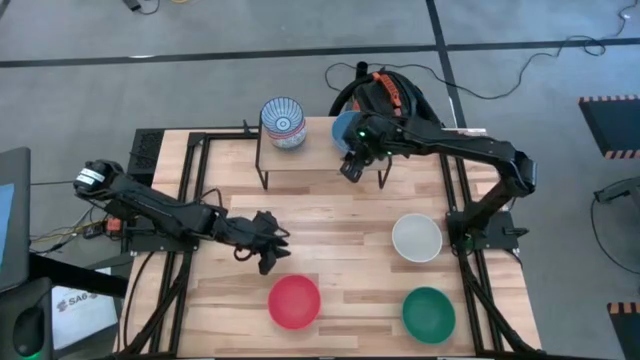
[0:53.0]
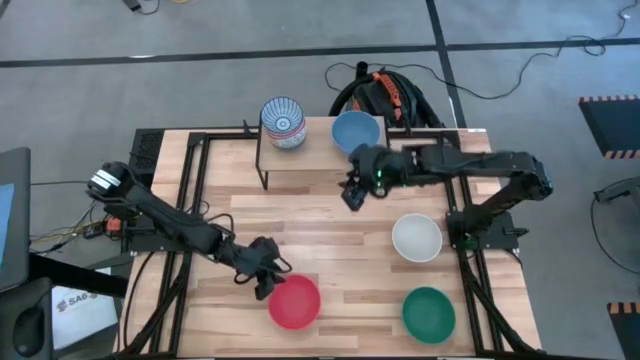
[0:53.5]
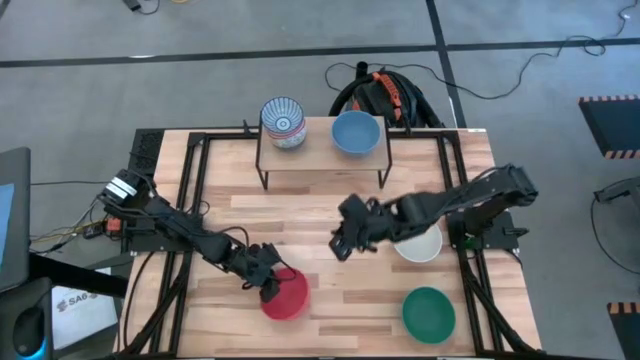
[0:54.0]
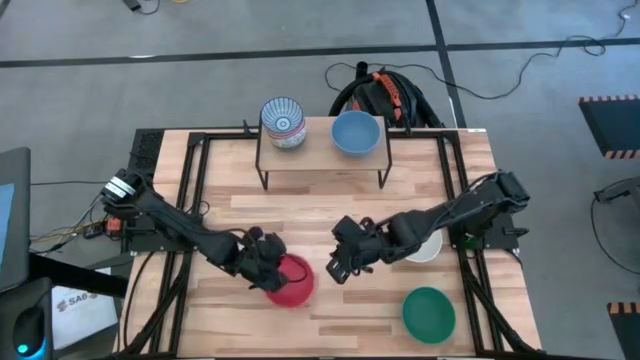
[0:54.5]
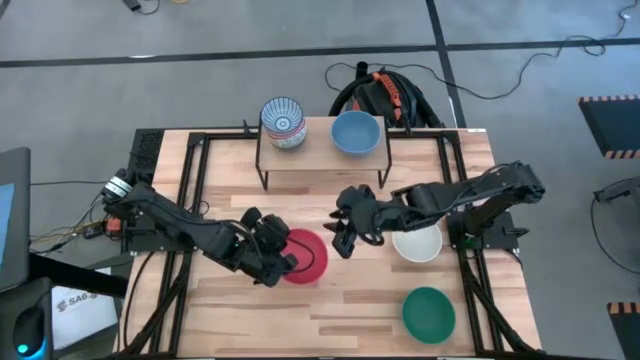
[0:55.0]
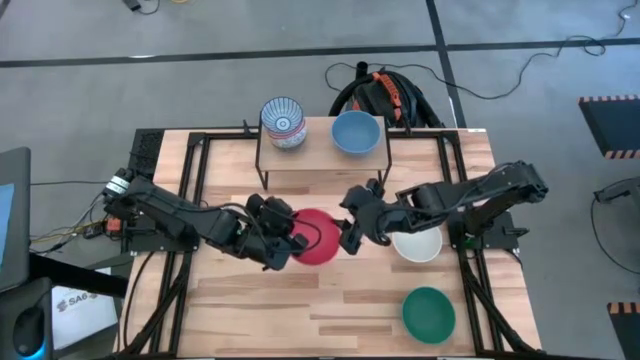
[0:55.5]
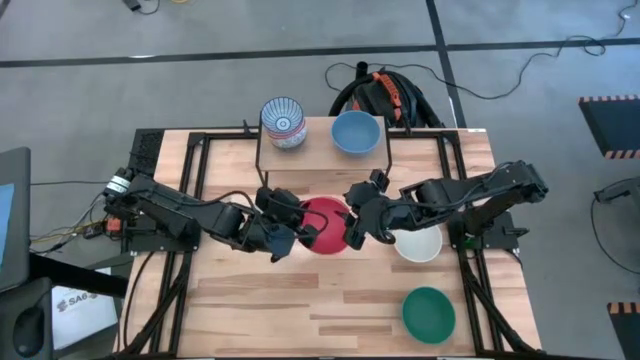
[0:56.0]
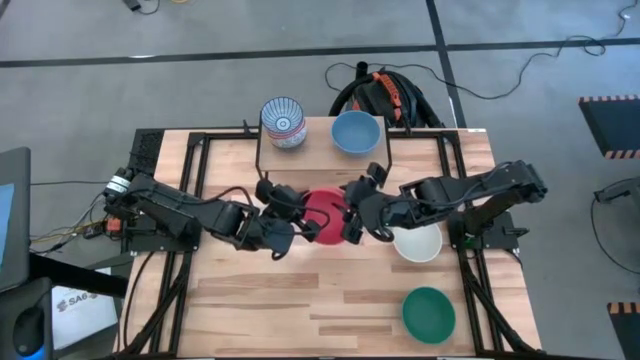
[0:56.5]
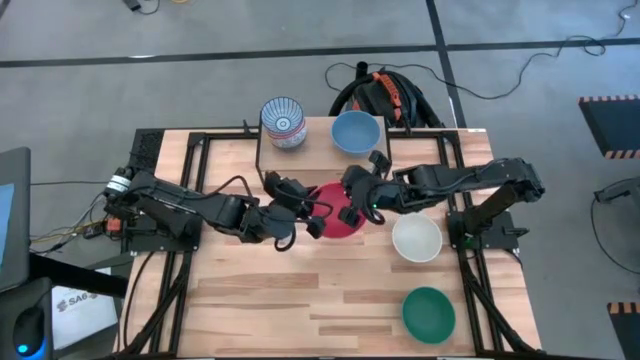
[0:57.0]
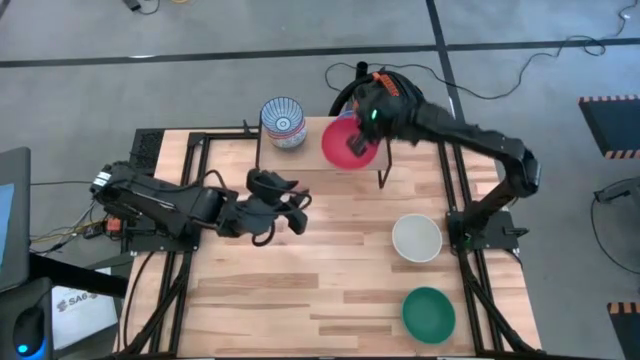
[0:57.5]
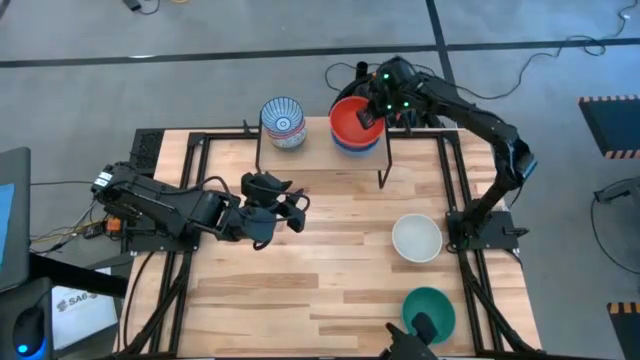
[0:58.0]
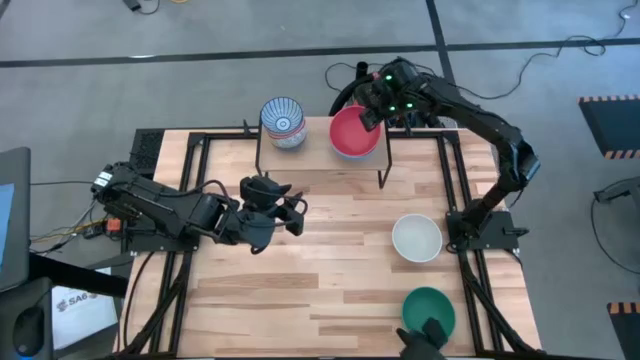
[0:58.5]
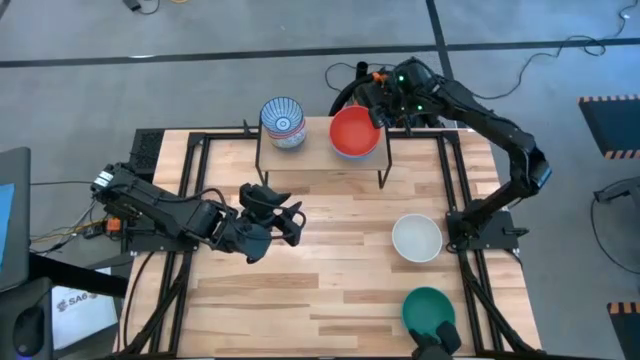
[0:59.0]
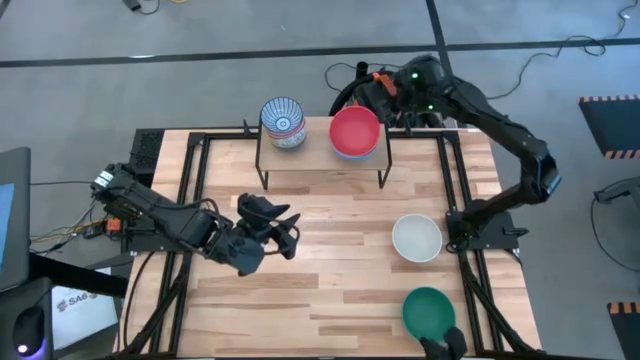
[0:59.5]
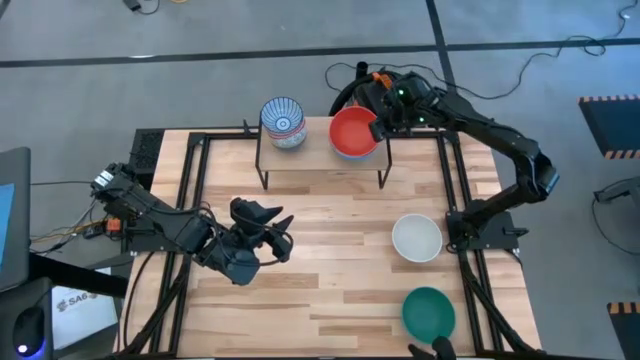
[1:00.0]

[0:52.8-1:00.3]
Task: Place and stack bowls onto a shelf
Stack the red bowl on top of the blue bowl on the shelf

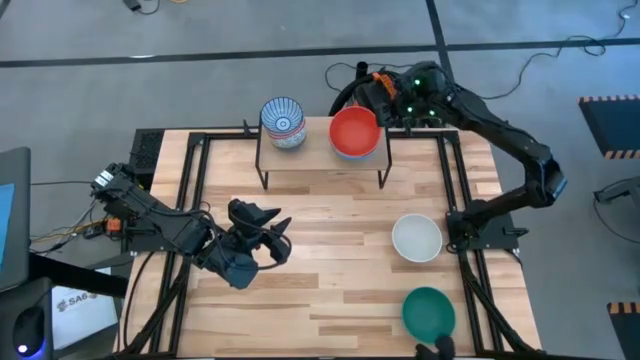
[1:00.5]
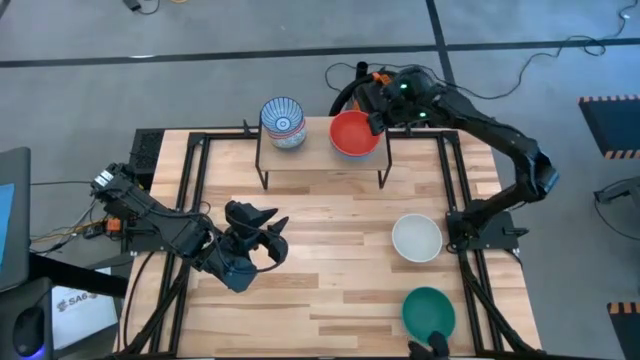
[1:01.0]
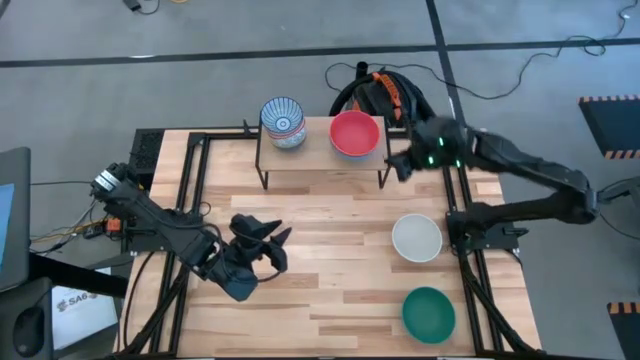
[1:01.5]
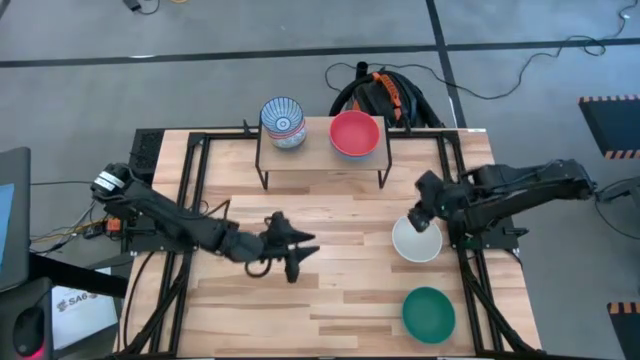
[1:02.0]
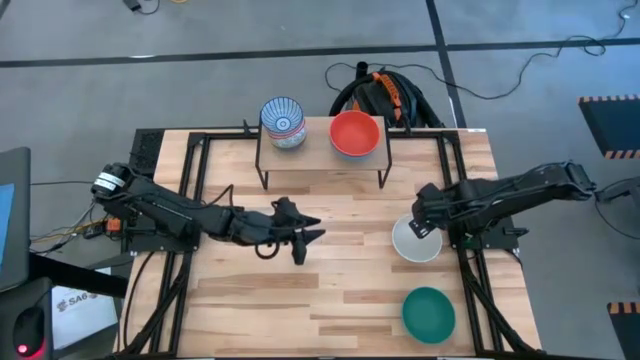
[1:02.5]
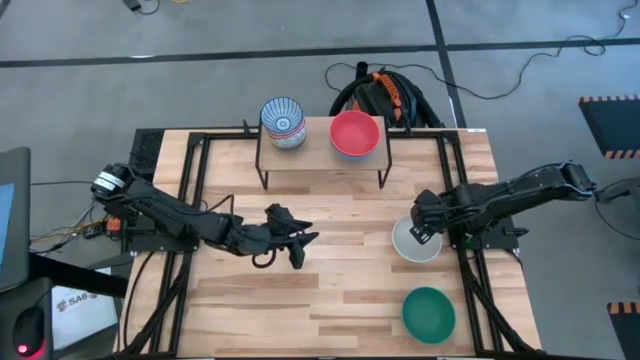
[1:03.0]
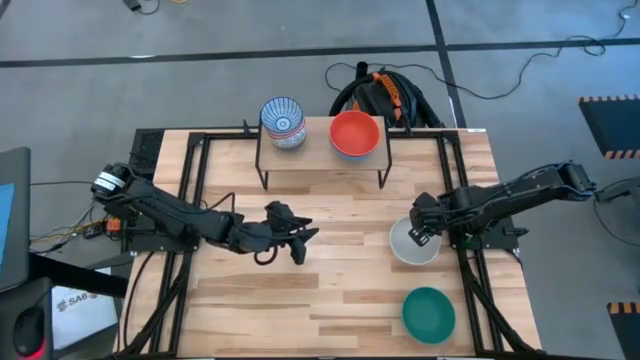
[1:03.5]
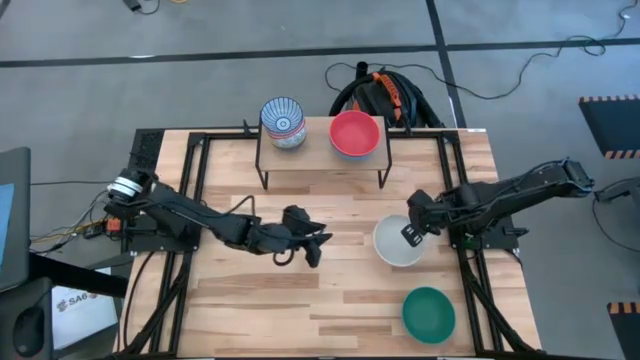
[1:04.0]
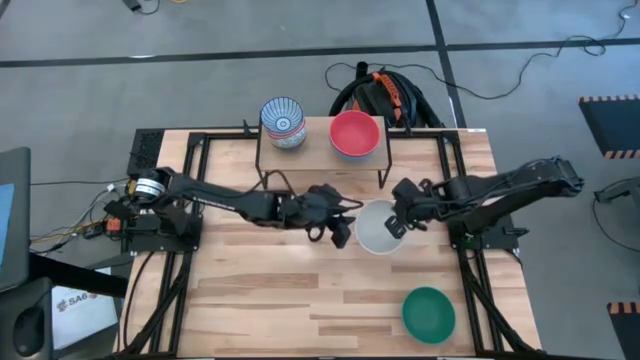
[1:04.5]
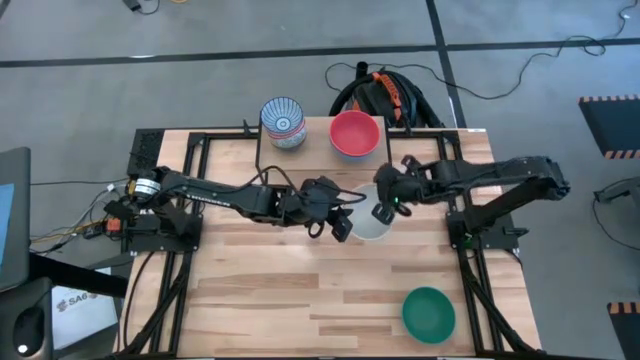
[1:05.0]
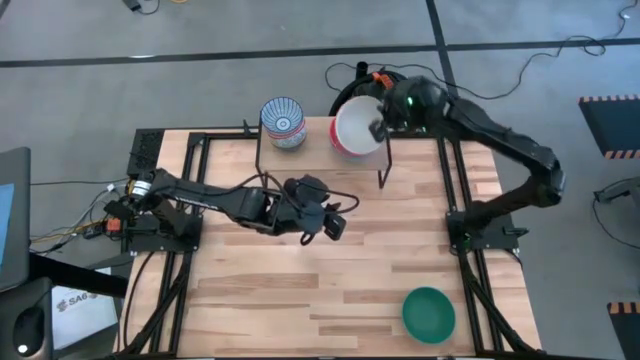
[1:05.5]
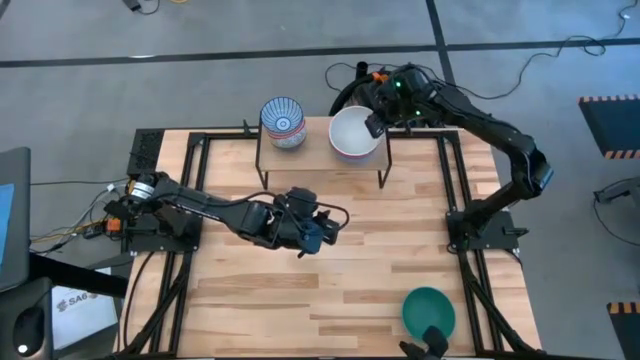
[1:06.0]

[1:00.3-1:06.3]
Stack the white bowl on top of the red bowl on the shelf

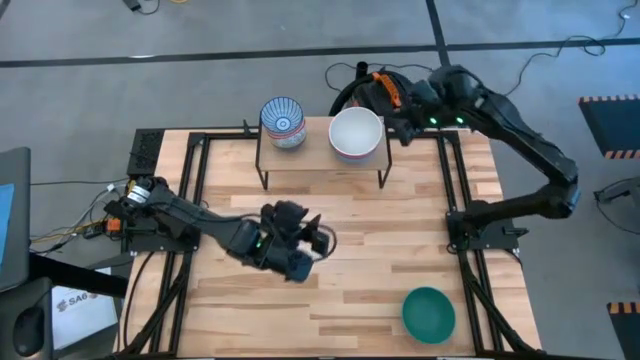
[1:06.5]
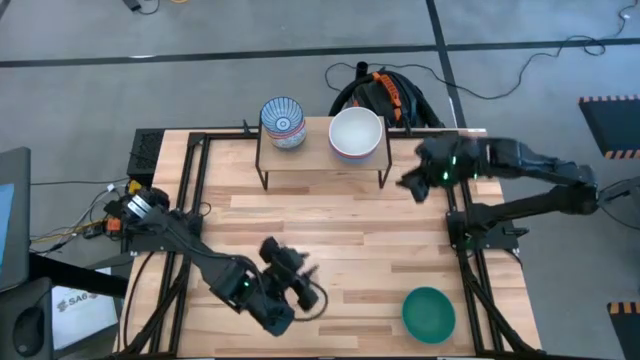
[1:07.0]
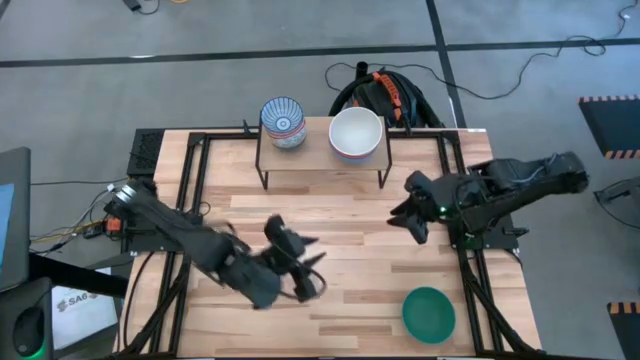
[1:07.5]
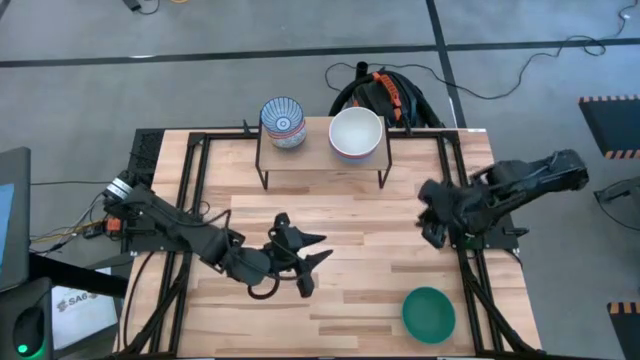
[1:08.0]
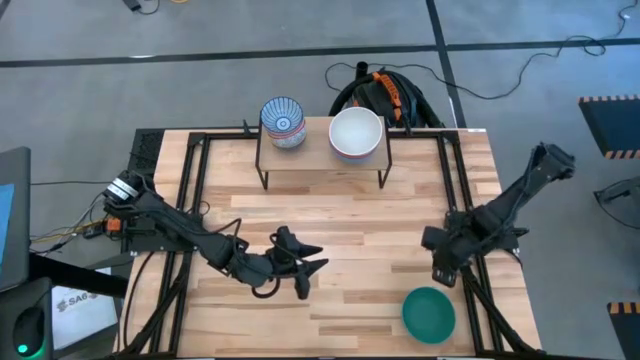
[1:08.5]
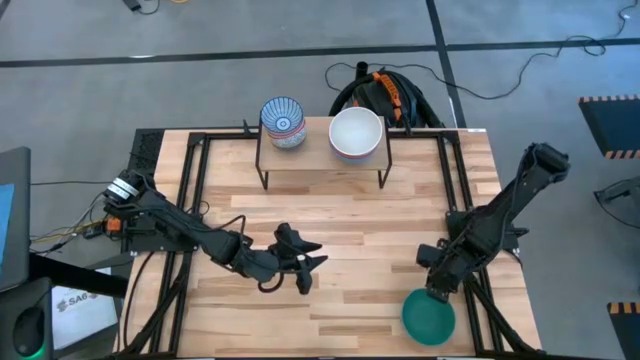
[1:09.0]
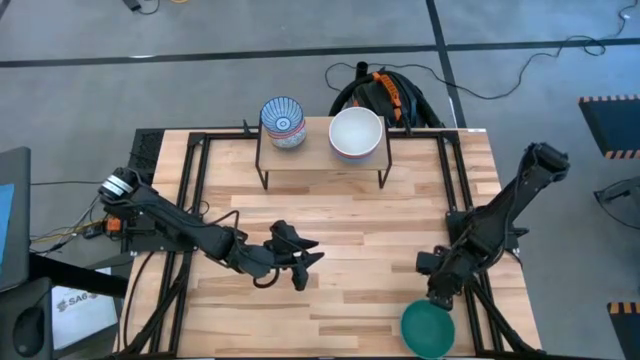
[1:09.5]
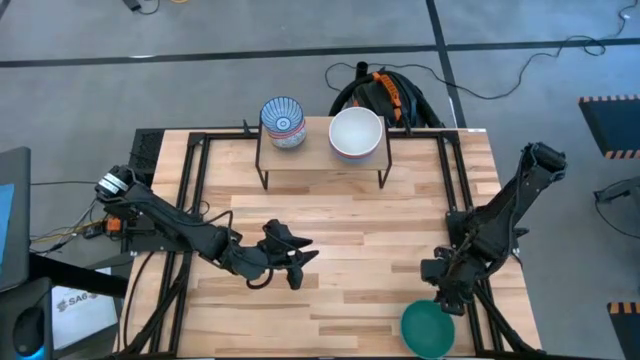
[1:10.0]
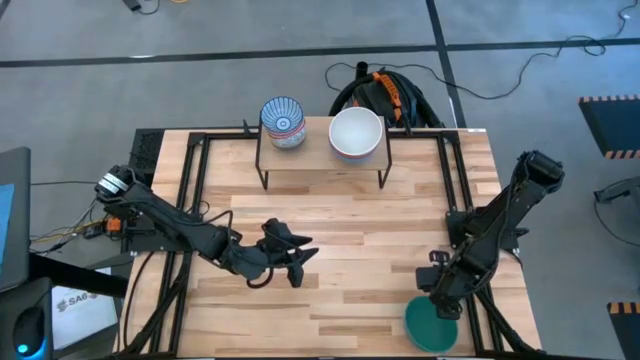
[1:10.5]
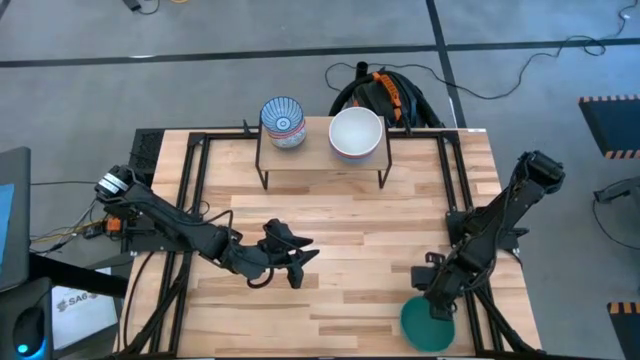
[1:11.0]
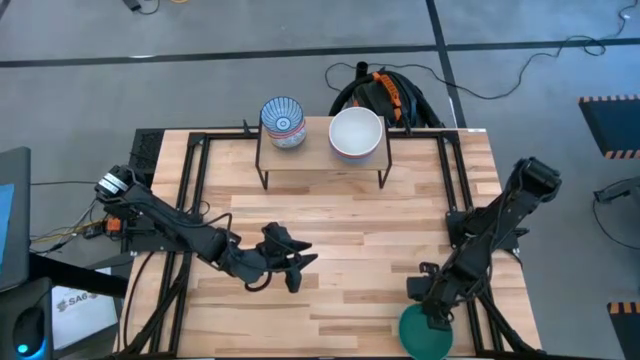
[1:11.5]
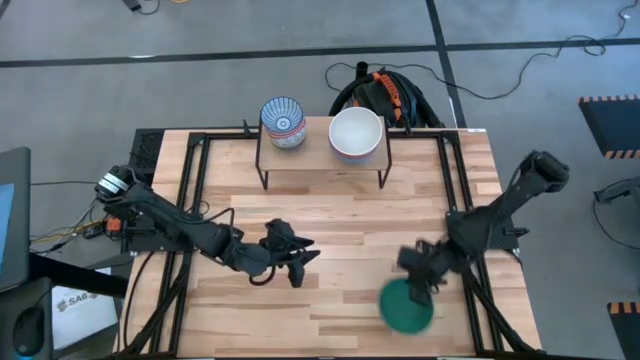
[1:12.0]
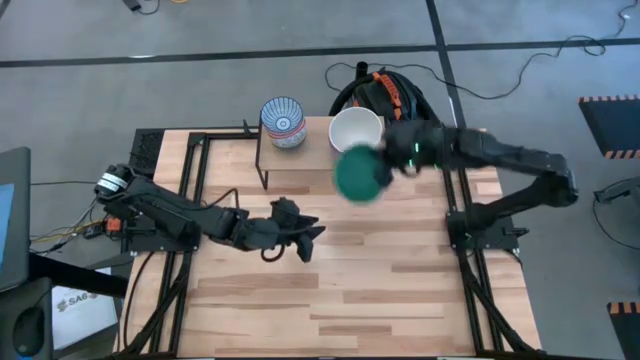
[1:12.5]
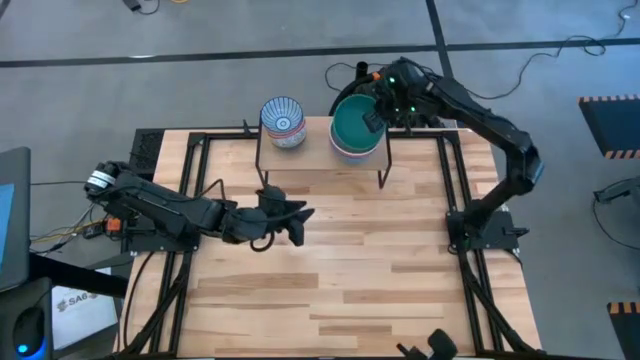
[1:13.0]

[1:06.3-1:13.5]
Stack the green bowl on top of the white bowl on the shelf

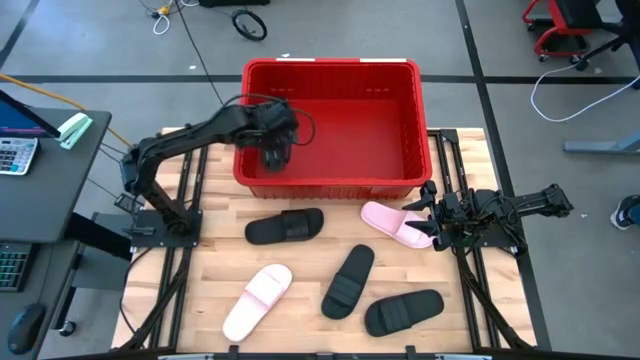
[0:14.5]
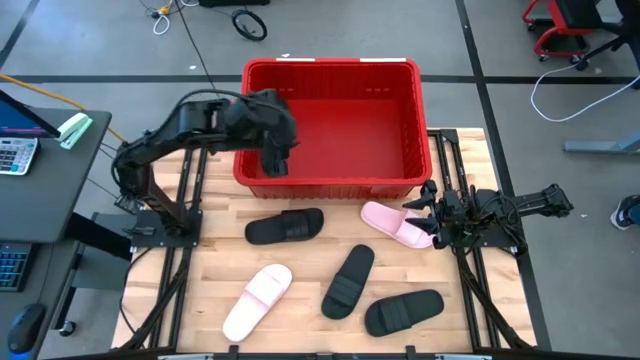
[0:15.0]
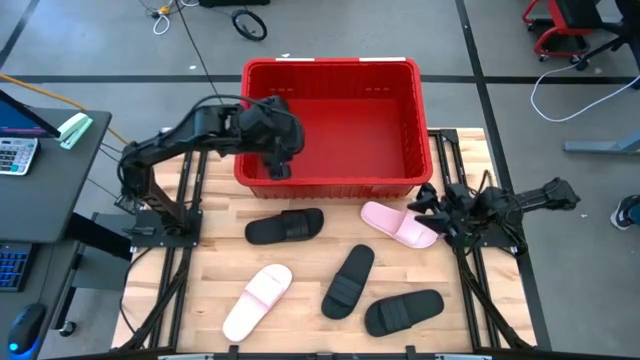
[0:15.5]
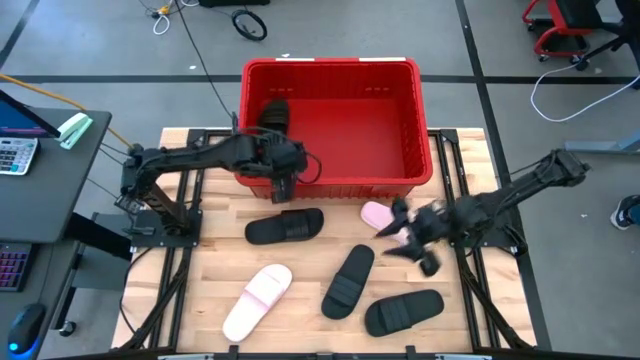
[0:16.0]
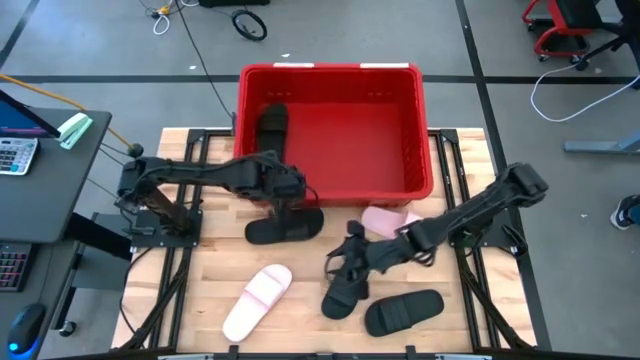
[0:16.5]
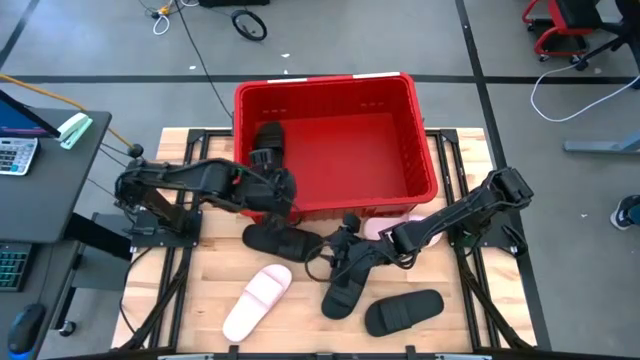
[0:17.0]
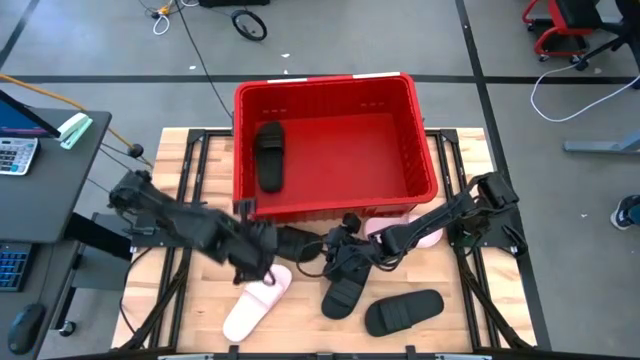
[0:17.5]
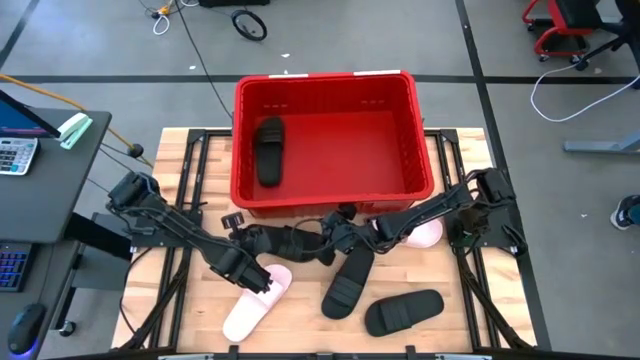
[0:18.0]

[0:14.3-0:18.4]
Task: Pick and place slides into bin
Adjust the red bin
